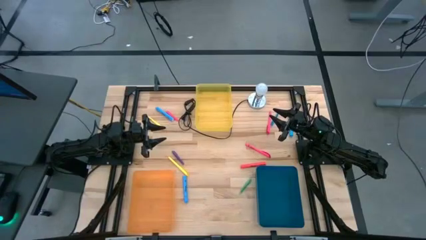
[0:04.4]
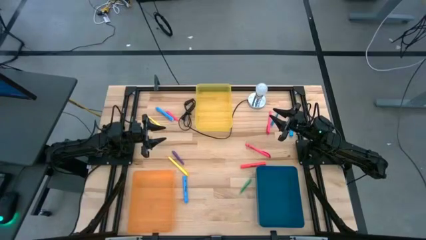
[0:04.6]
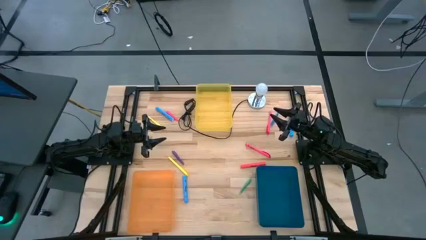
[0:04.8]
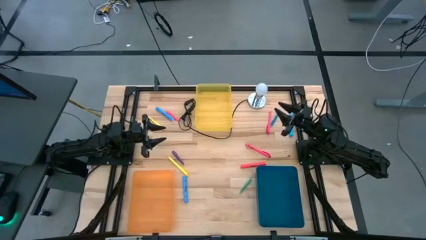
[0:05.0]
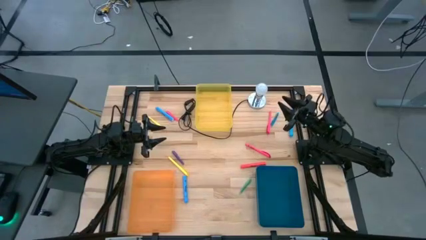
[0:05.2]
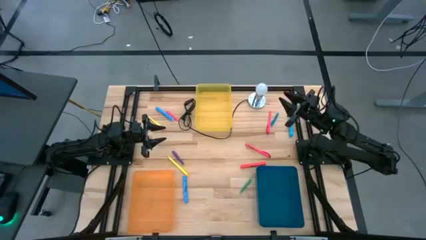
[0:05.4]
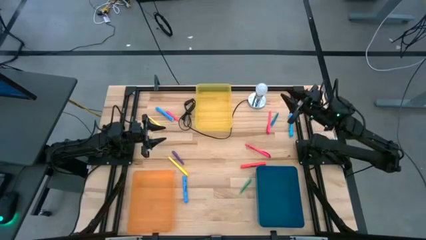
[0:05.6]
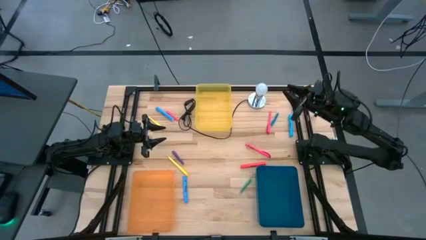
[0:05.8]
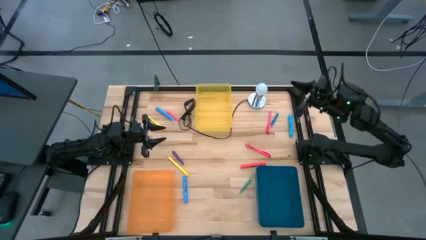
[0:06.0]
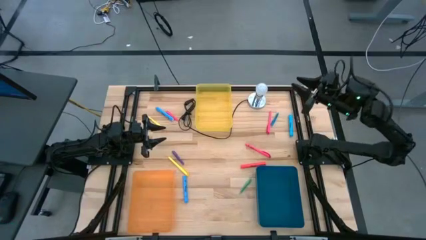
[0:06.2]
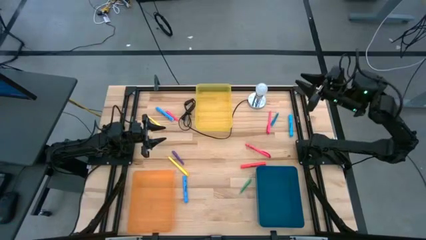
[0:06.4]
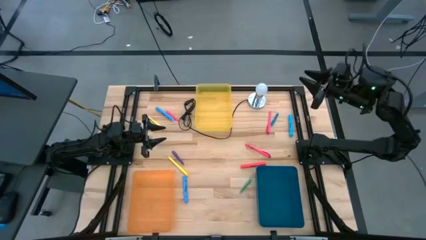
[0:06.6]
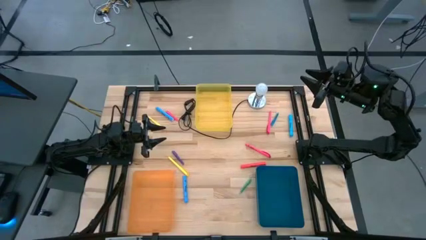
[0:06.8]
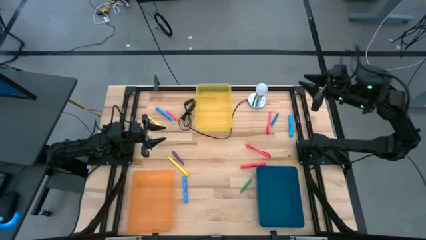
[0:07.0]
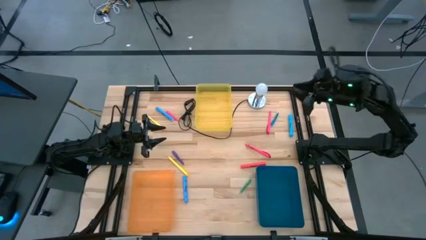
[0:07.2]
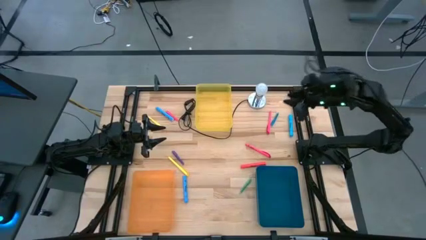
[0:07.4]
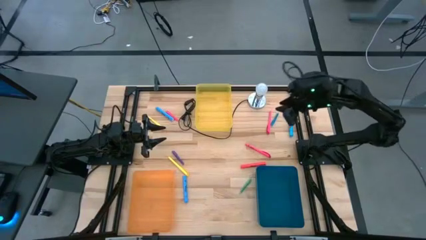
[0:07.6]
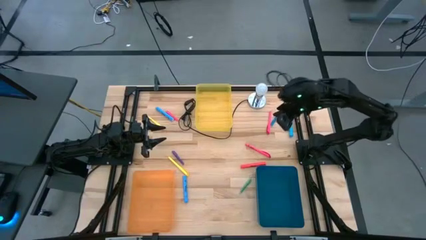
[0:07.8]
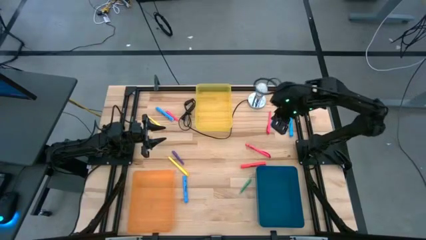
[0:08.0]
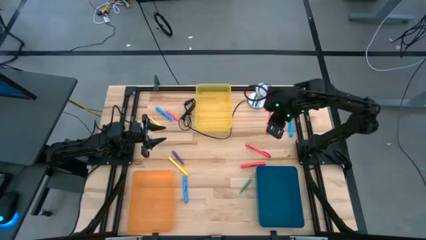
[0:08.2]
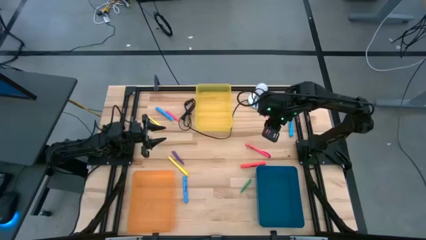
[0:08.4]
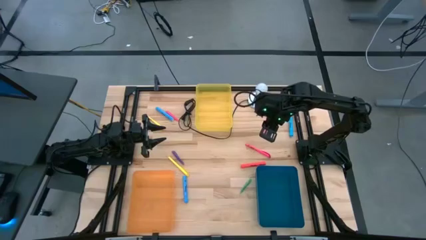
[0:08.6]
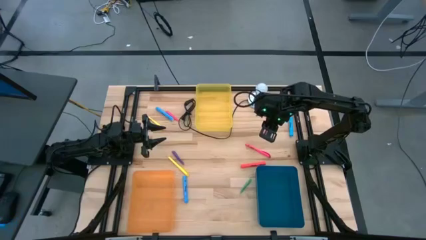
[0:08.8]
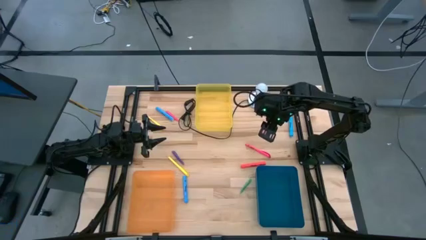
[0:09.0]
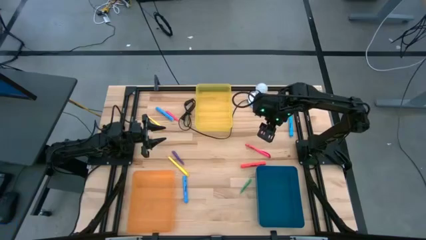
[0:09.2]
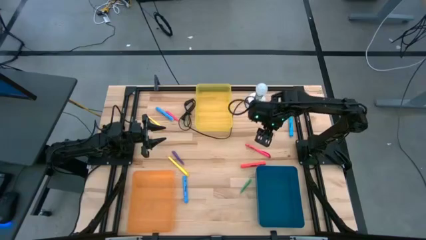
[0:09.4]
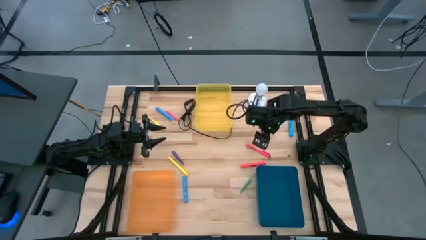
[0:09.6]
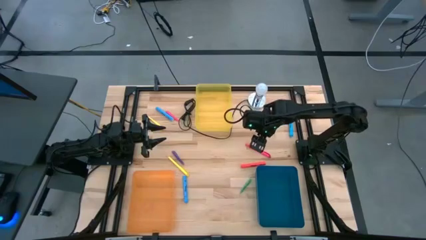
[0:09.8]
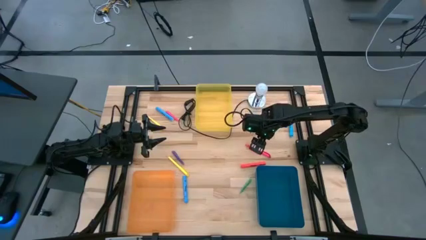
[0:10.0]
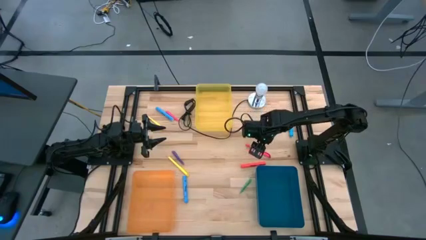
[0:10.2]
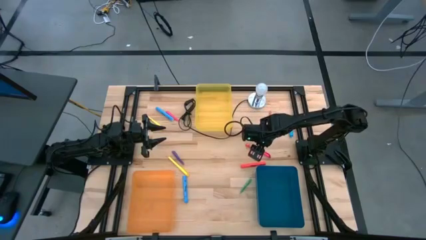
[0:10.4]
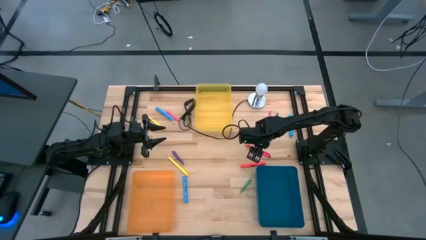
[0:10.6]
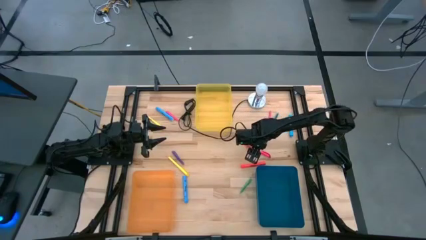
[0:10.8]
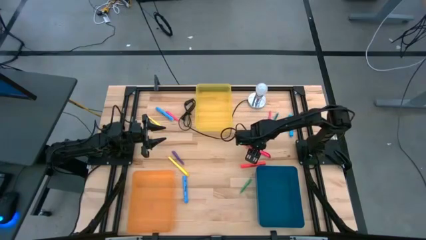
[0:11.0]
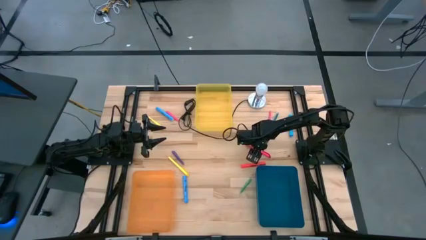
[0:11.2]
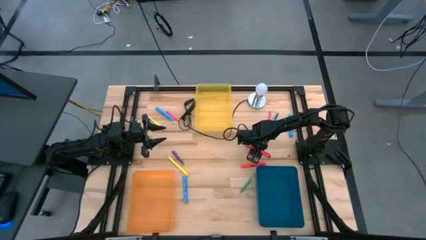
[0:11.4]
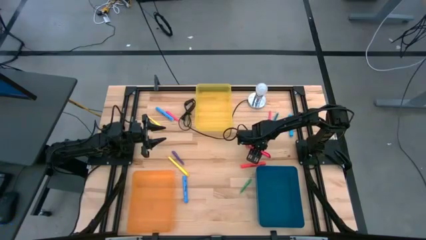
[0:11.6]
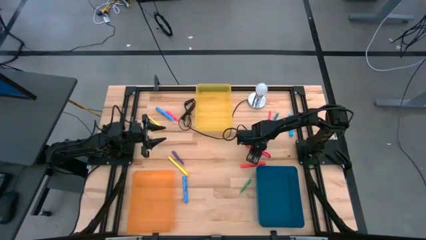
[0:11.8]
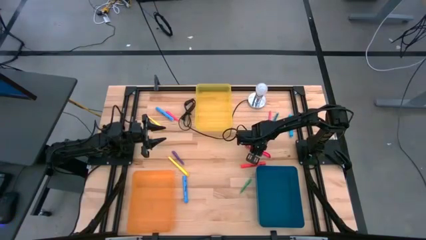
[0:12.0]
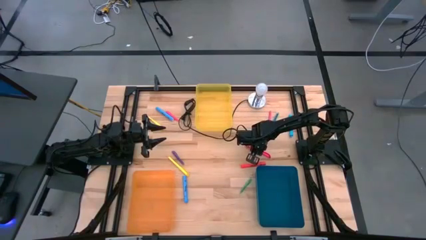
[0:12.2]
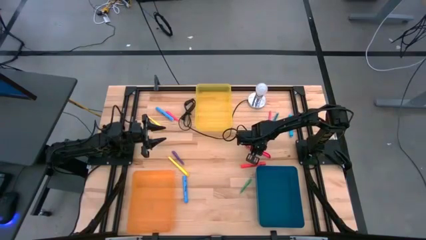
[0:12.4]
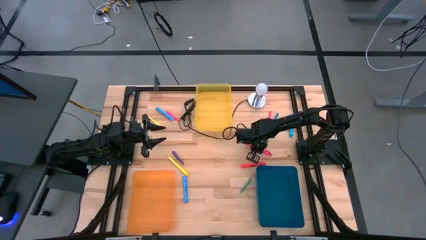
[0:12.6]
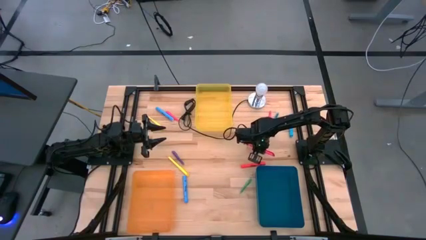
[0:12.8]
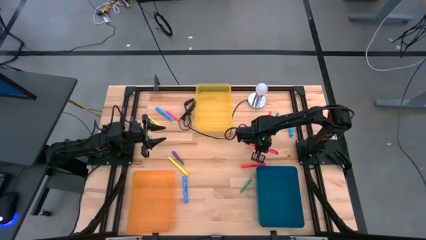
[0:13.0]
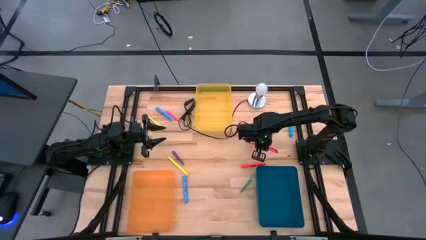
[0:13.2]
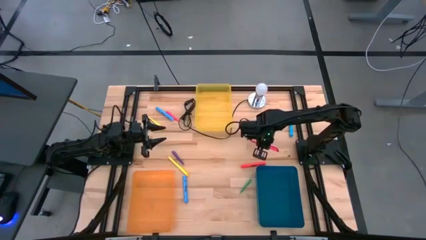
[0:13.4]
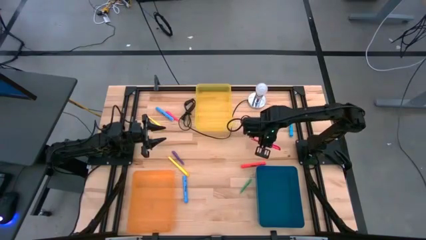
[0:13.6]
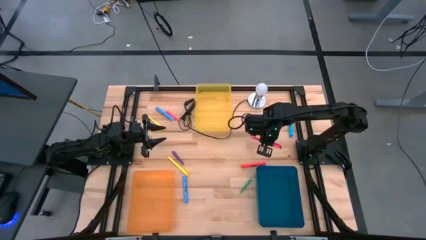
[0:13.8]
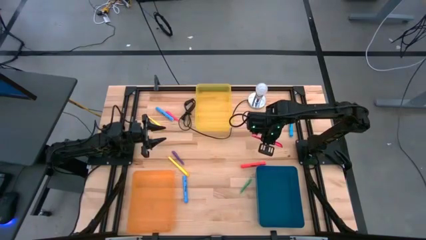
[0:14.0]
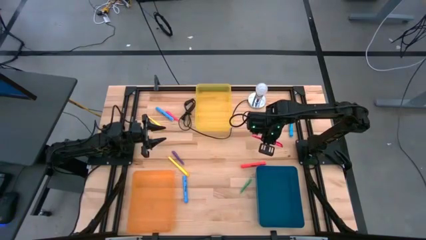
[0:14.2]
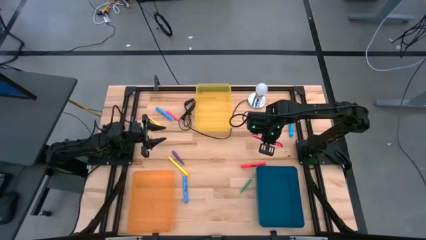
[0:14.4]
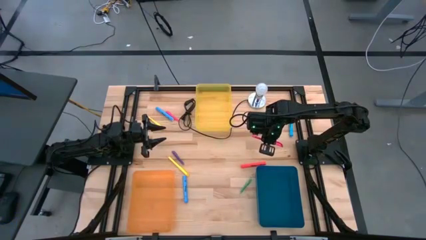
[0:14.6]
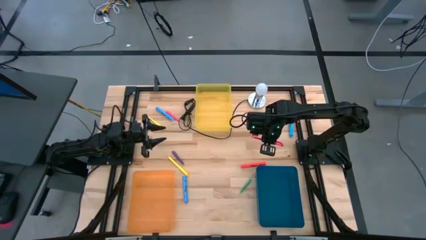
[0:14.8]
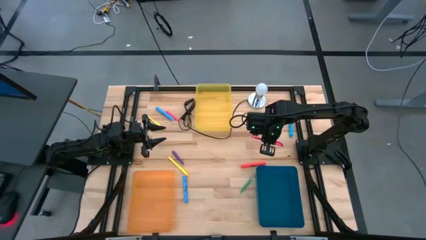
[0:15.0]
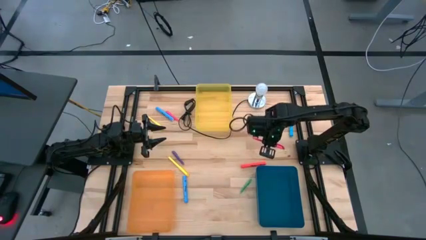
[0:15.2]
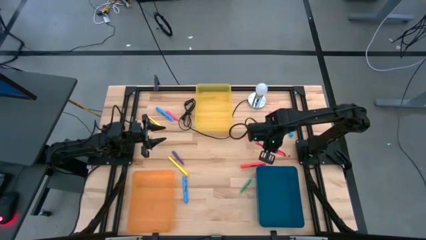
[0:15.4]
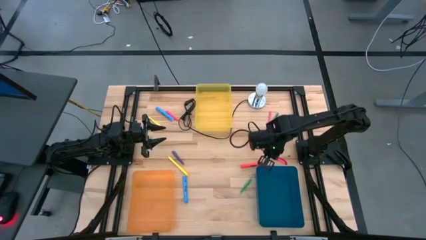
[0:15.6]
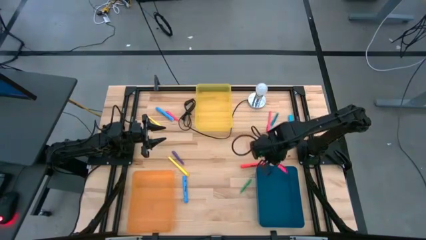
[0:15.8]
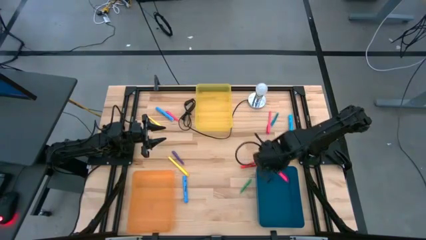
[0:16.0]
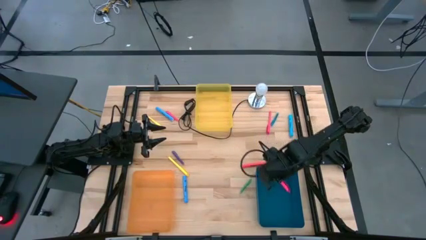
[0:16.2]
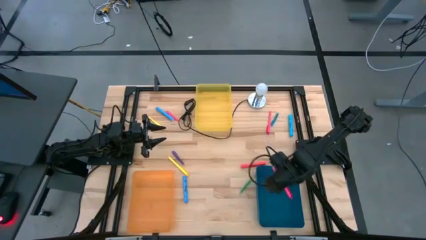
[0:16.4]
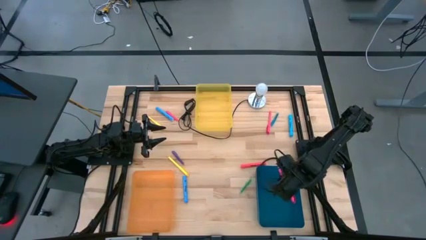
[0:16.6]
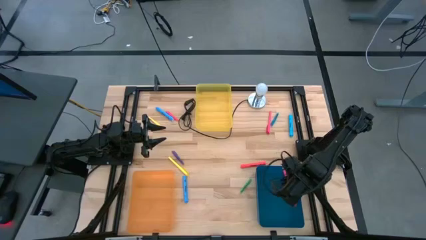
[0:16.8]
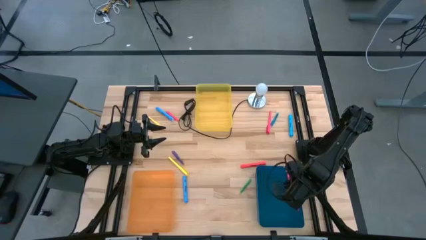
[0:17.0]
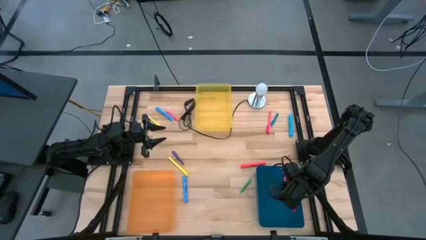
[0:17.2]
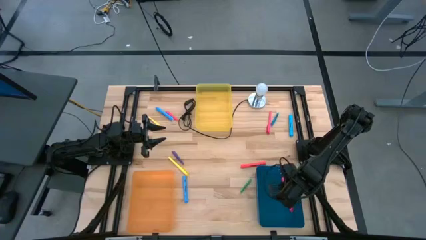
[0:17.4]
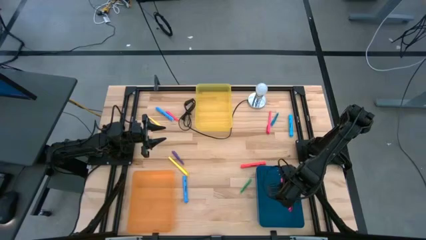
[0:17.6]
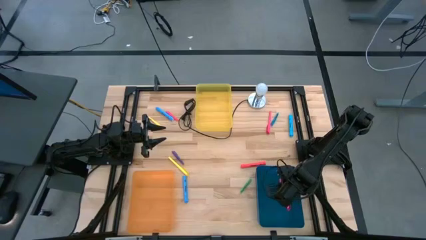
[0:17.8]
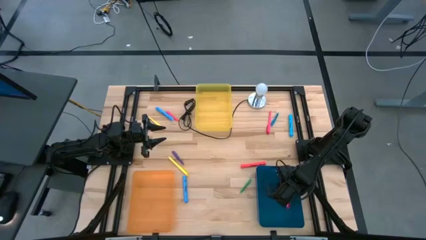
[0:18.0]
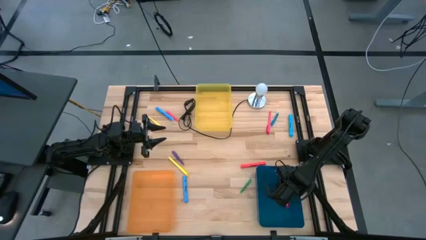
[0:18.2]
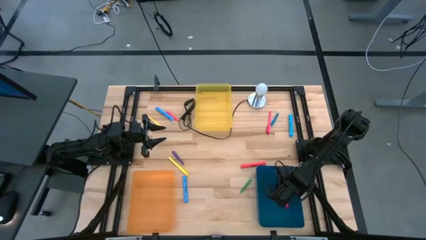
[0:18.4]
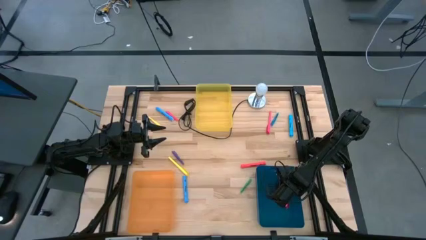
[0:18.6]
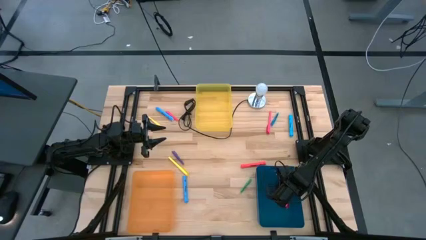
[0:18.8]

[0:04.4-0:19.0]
Task: Pick & Place Markers
Put the bottom pink highlighter pen into the blue bin
